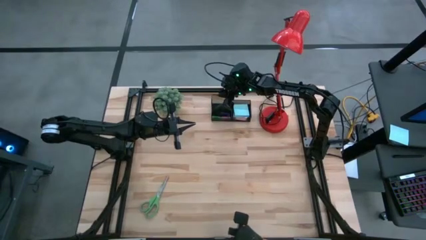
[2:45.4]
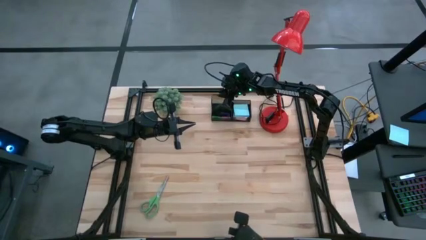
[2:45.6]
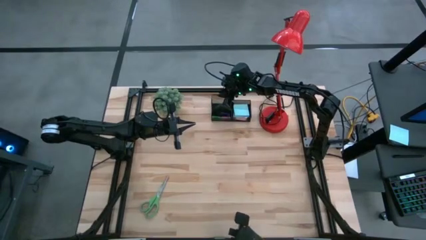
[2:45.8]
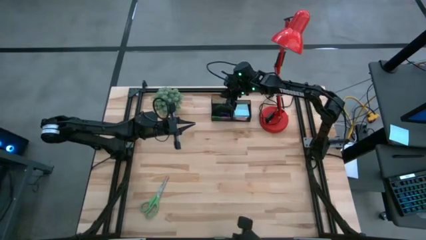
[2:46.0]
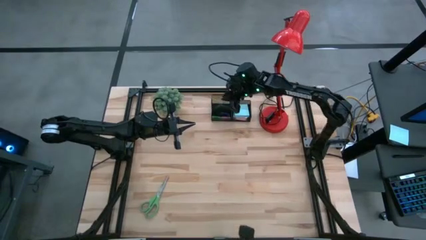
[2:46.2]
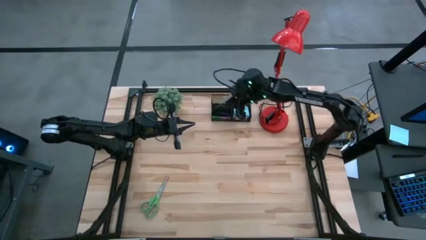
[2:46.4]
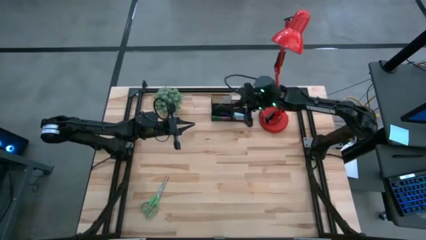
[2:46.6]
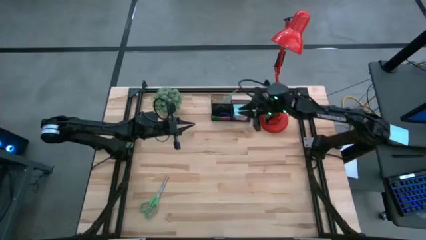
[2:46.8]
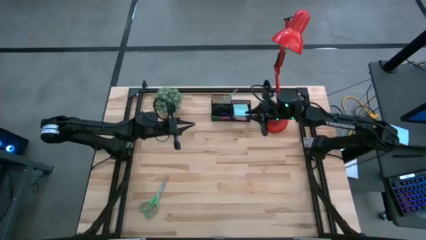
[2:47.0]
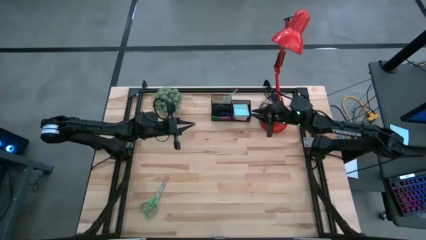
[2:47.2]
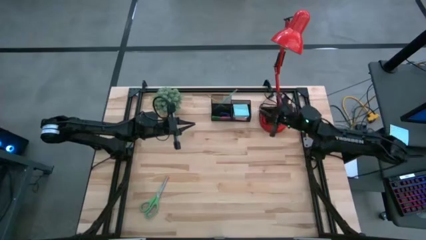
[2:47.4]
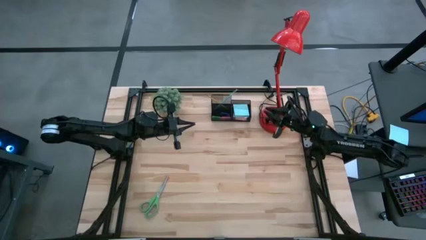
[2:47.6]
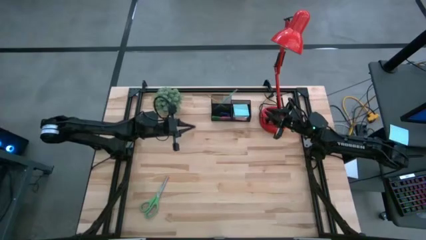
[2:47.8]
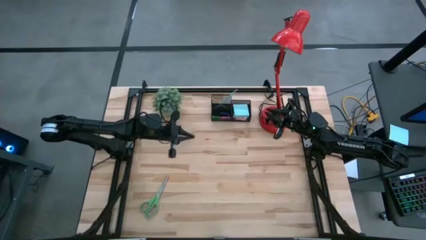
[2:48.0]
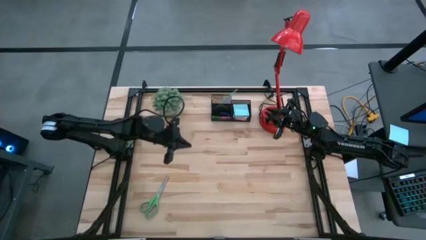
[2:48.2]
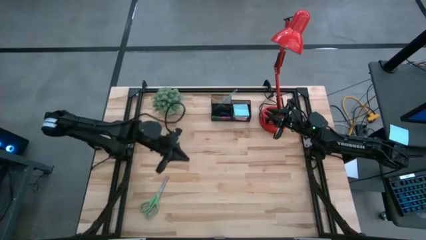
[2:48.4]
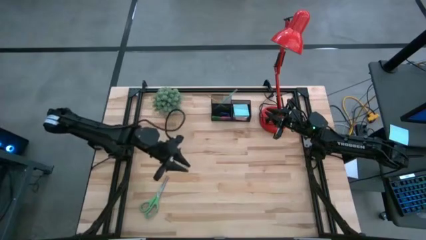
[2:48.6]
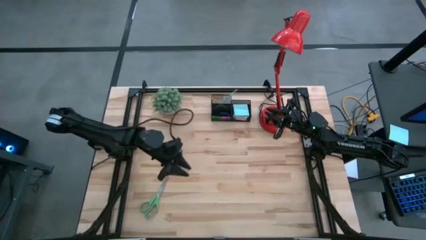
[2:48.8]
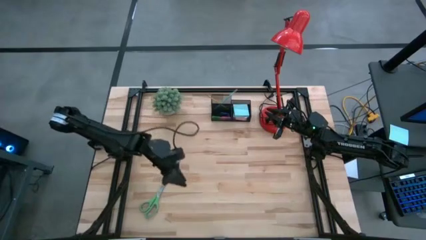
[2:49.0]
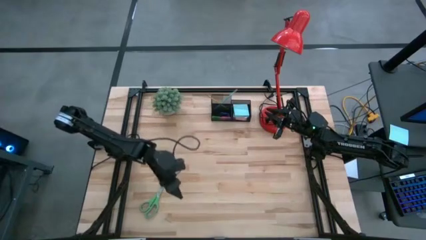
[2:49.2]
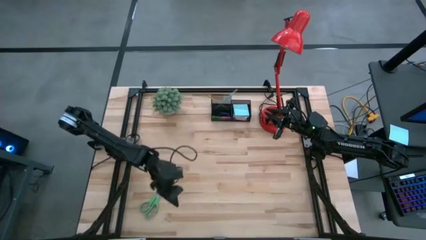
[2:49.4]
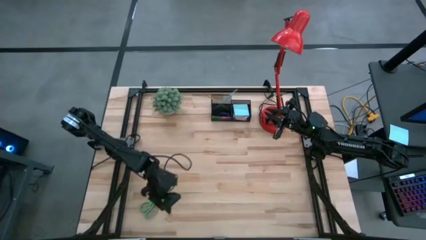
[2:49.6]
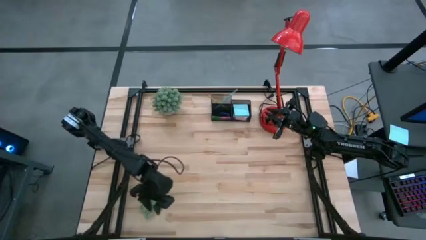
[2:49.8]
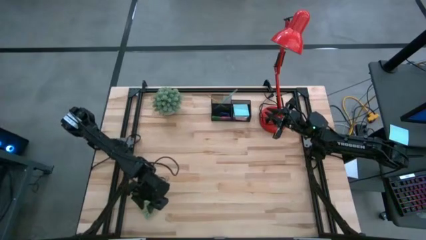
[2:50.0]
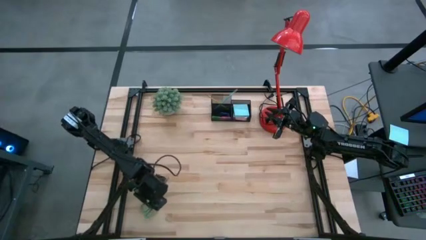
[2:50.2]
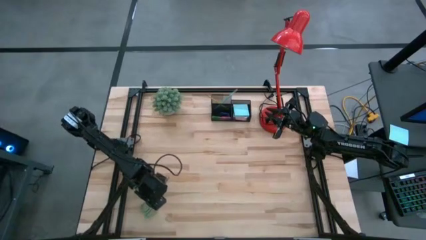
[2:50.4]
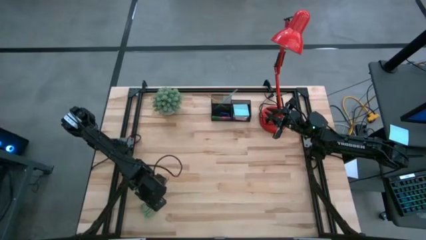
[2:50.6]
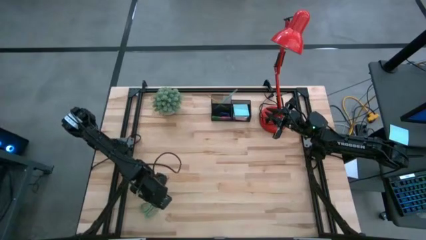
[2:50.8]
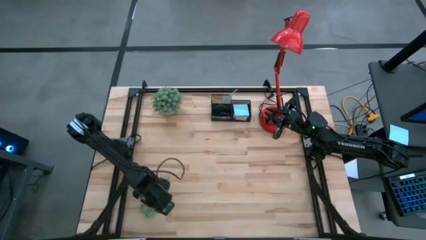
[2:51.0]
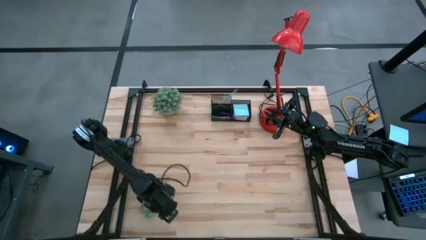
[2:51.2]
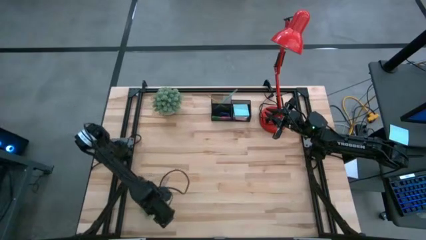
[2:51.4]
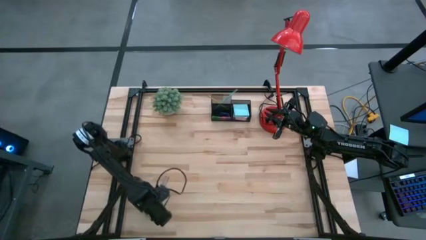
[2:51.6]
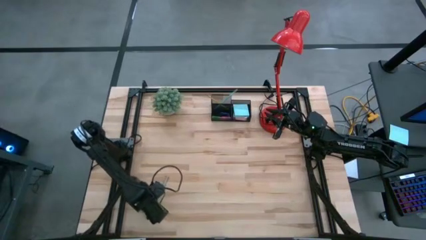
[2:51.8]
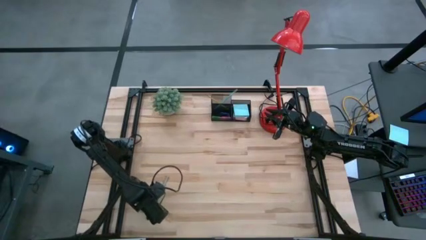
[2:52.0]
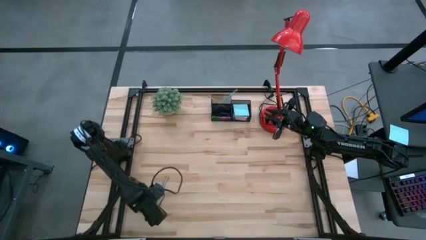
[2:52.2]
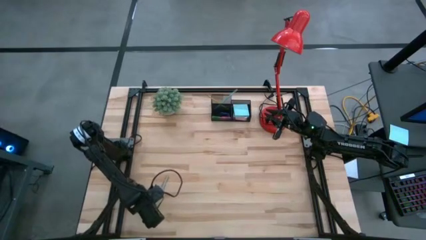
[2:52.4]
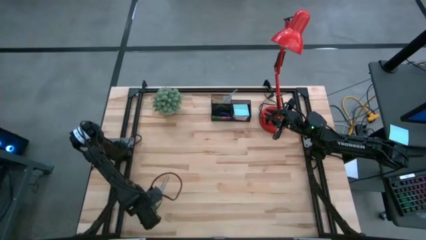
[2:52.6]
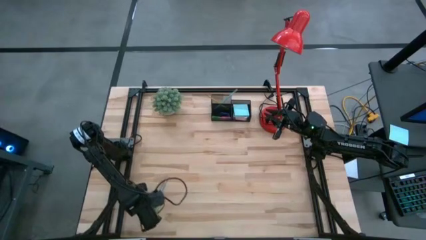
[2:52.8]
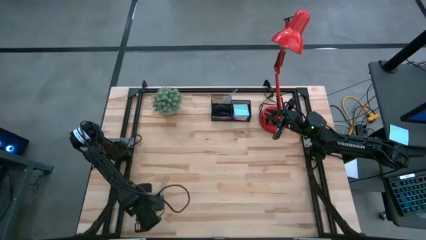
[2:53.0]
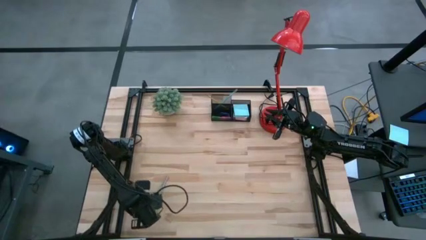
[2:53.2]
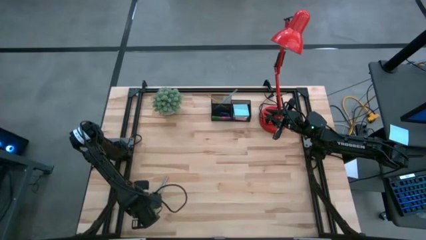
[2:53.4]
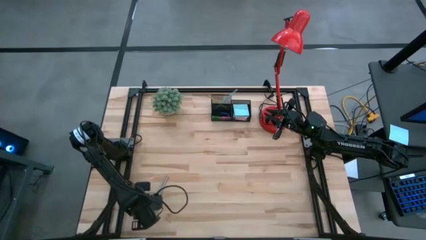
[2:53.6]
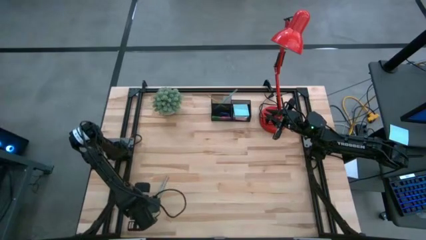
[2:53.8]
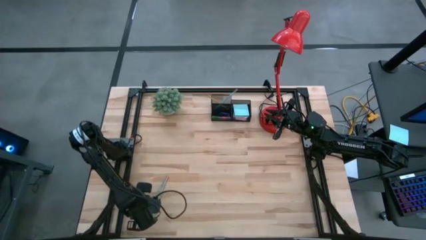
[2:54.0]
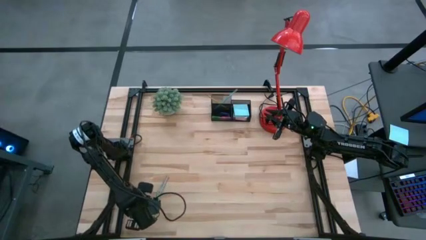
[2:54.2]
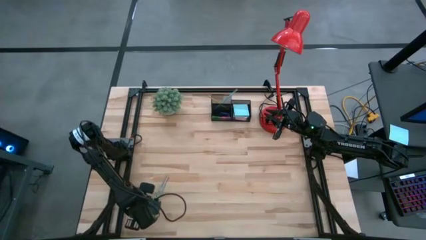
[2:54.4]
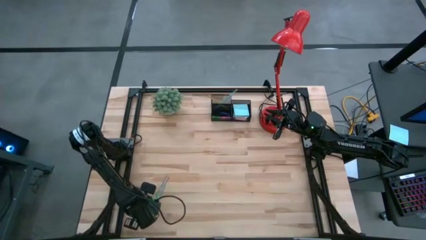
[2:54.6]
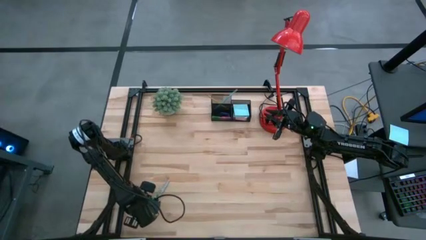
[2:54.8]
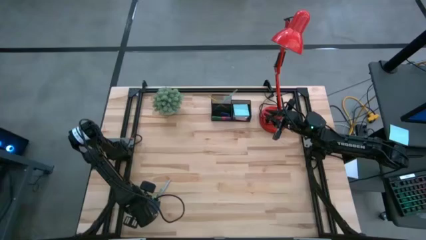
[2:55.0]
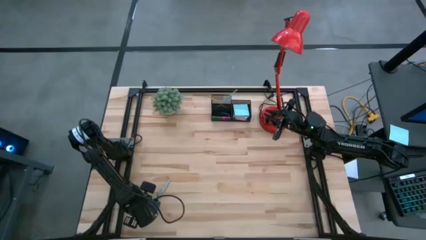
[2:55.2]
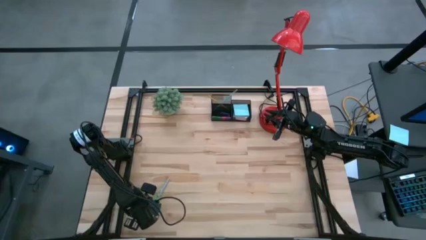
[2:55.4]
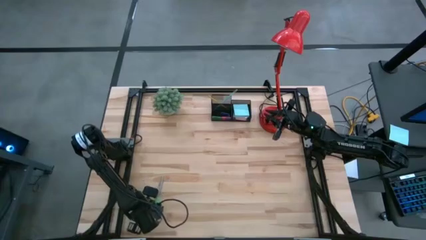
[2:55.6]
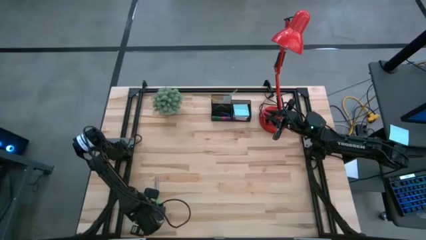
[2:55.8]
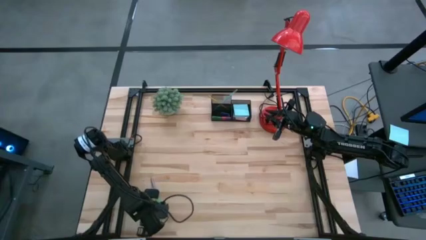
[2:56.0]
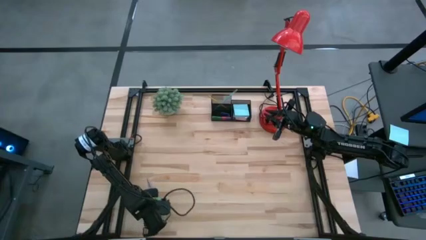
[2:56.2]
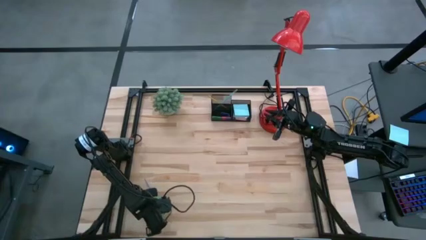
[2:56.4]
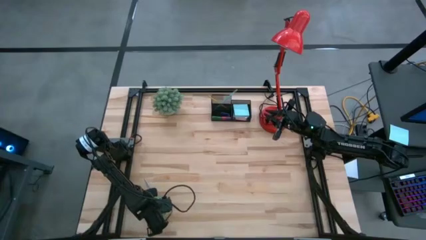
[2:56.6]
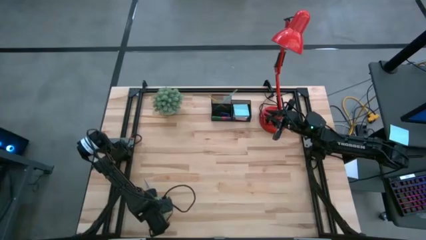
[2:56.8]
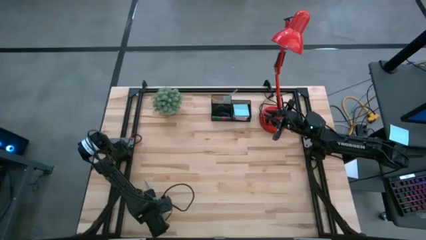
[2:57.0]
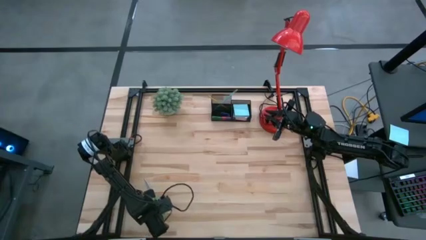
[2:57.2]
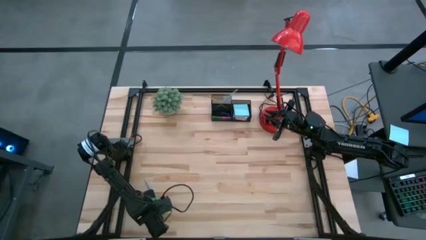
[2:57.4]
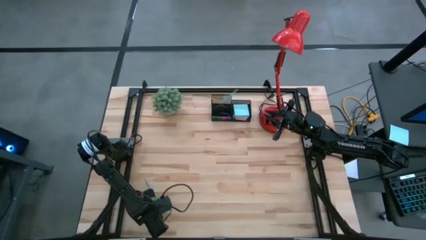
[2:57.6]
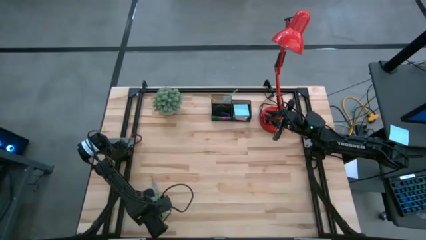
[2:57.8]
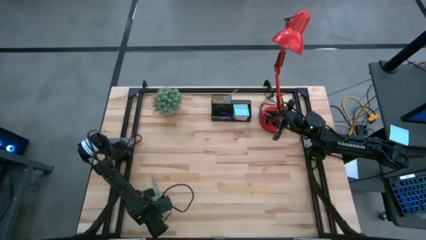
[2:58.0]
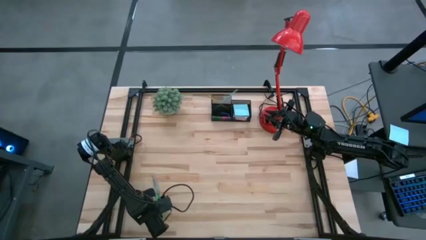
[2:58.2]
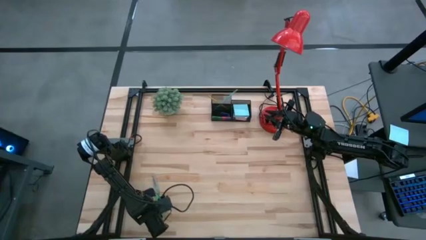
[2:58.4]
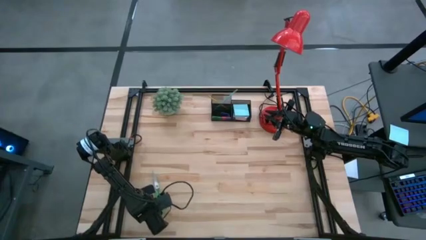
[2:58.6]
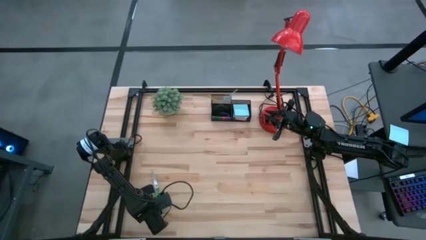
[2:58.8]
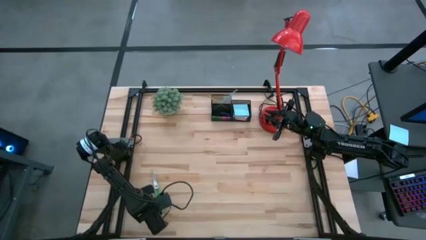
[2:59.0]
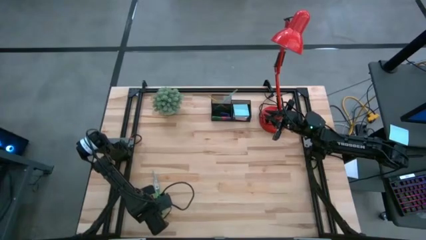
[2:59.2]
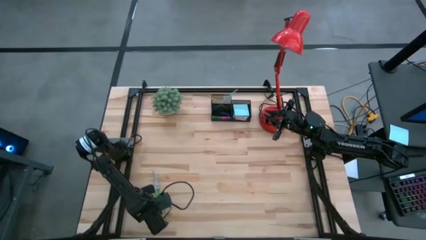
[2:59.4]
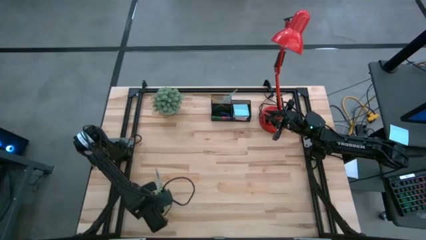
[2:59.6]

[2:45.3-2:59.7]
Task: Pick and place office supplies into organizer
Put the green scissors into the desk organizer
